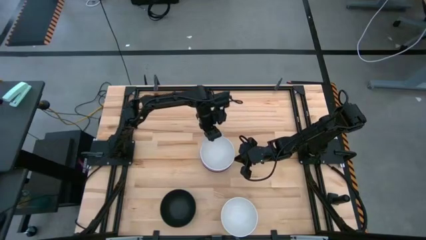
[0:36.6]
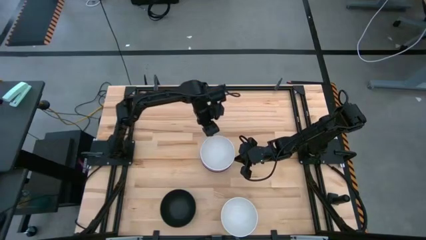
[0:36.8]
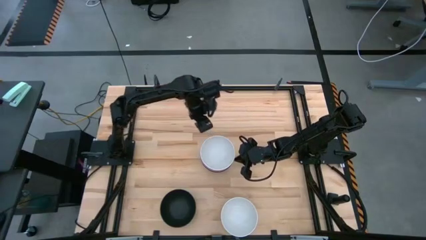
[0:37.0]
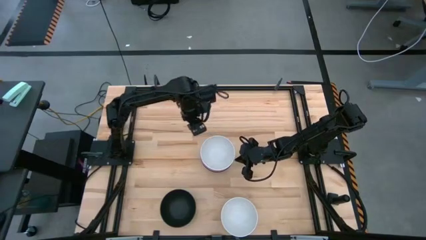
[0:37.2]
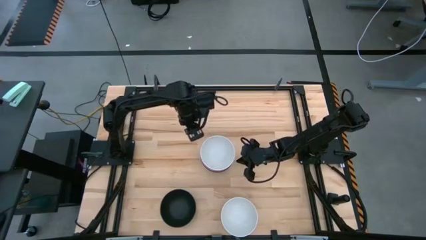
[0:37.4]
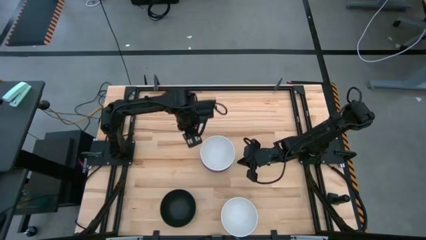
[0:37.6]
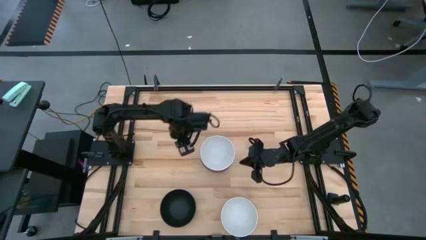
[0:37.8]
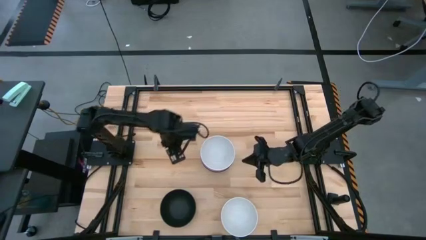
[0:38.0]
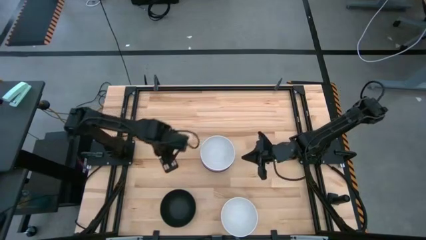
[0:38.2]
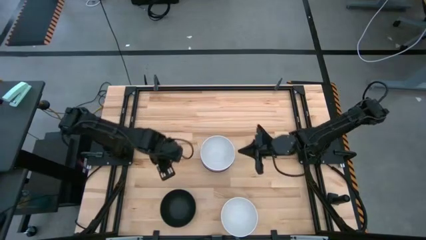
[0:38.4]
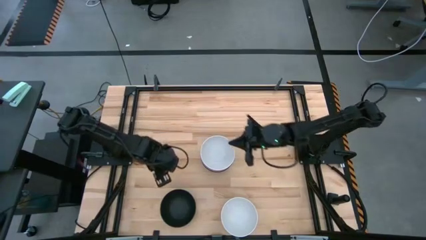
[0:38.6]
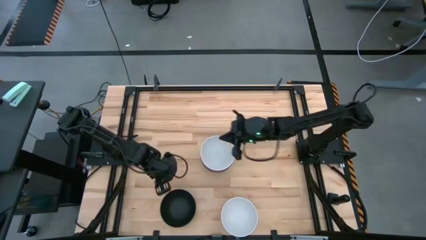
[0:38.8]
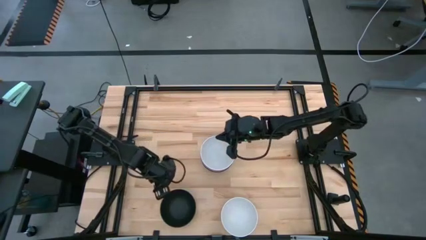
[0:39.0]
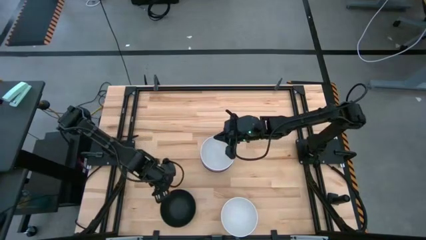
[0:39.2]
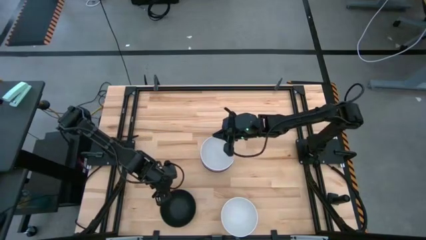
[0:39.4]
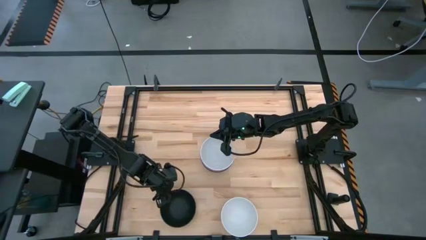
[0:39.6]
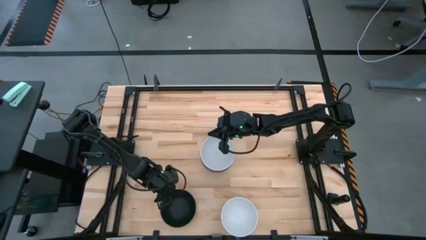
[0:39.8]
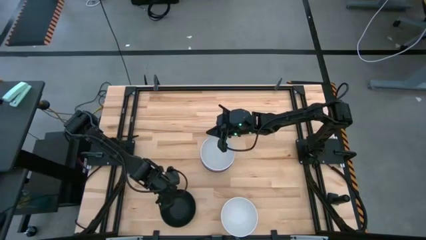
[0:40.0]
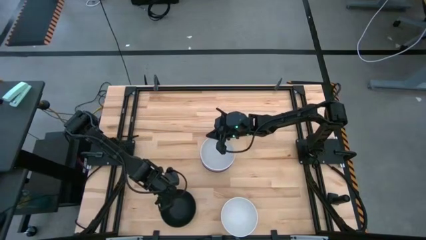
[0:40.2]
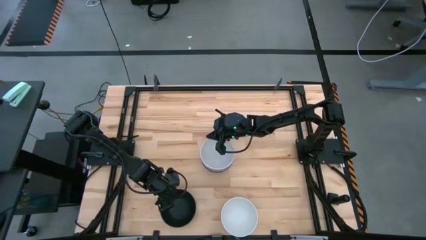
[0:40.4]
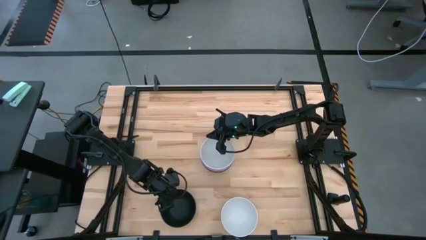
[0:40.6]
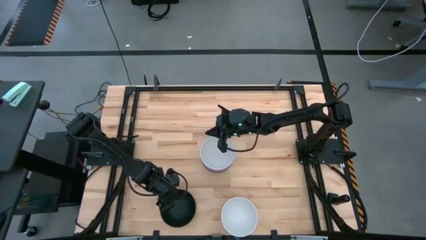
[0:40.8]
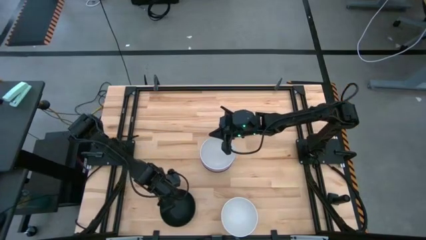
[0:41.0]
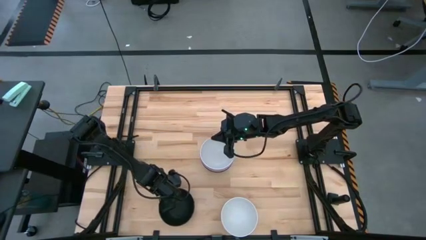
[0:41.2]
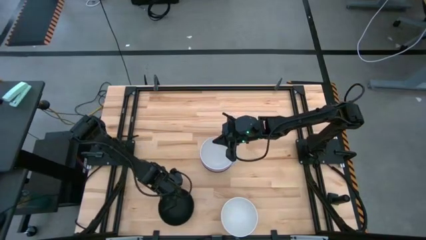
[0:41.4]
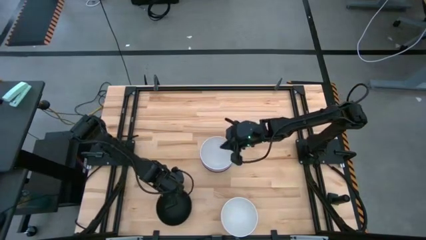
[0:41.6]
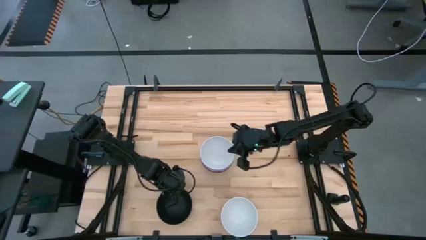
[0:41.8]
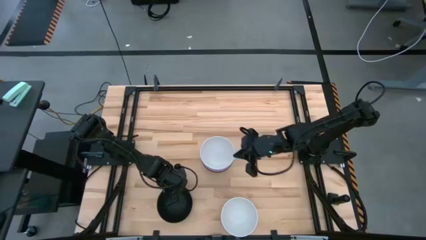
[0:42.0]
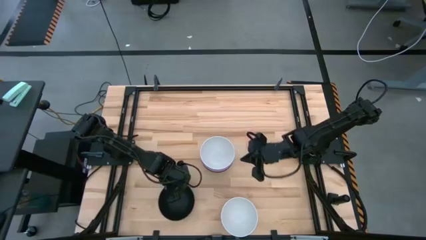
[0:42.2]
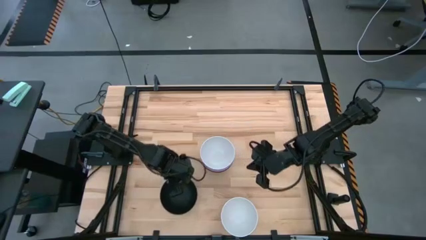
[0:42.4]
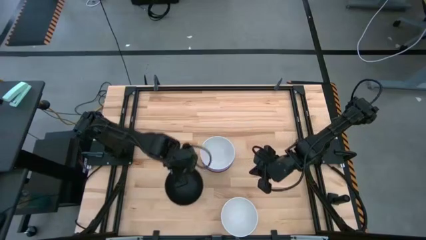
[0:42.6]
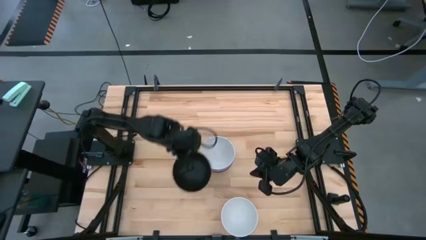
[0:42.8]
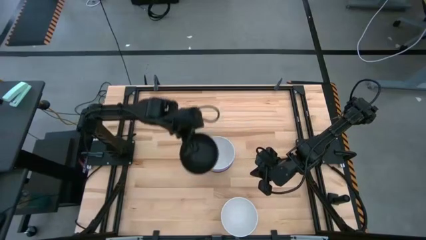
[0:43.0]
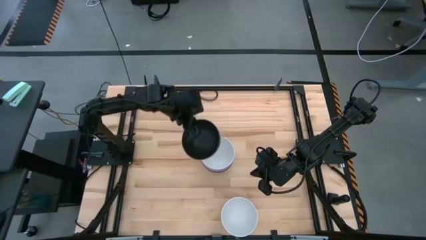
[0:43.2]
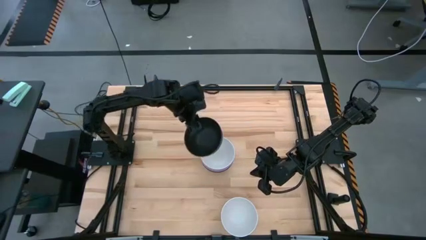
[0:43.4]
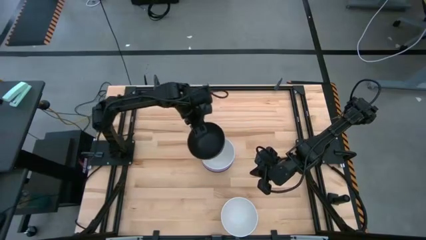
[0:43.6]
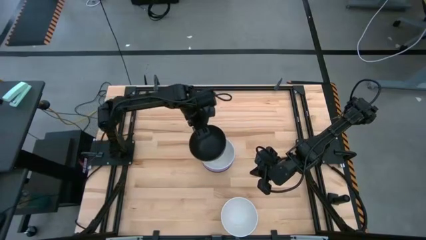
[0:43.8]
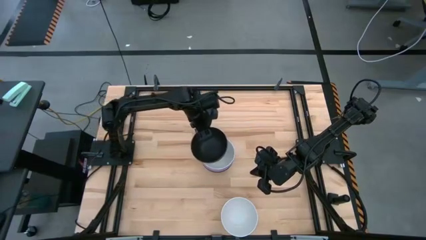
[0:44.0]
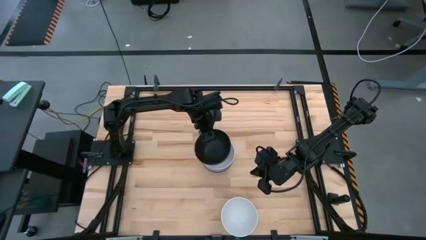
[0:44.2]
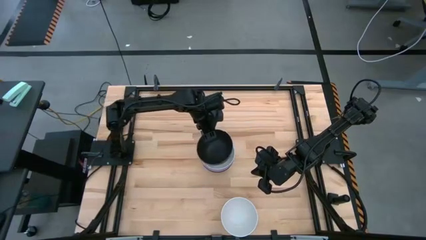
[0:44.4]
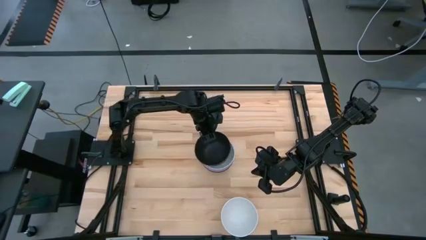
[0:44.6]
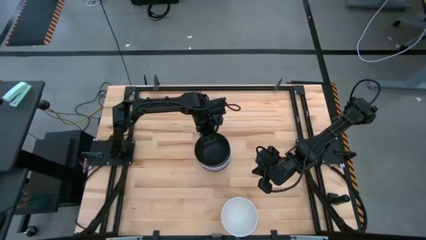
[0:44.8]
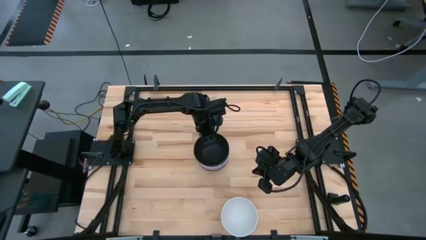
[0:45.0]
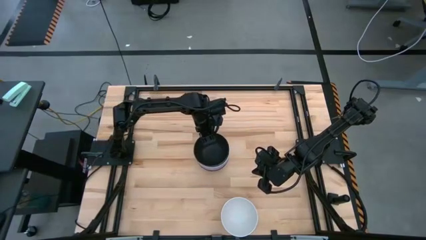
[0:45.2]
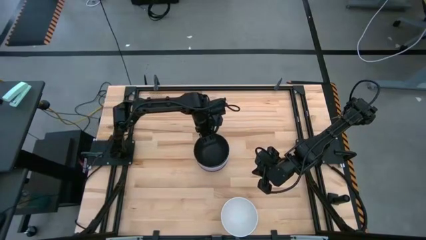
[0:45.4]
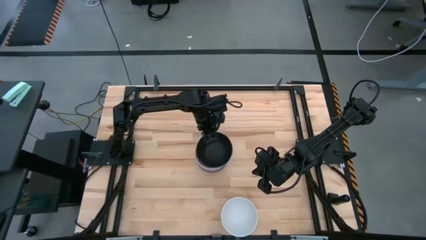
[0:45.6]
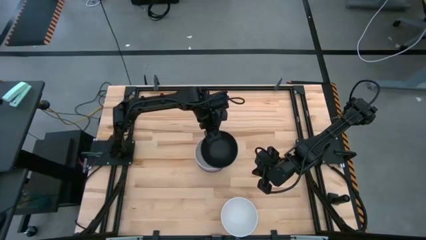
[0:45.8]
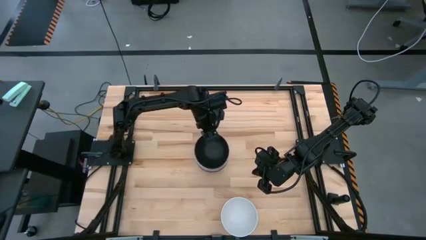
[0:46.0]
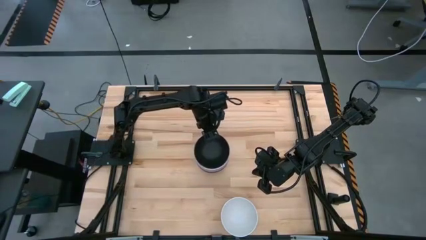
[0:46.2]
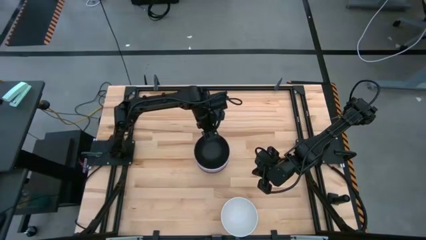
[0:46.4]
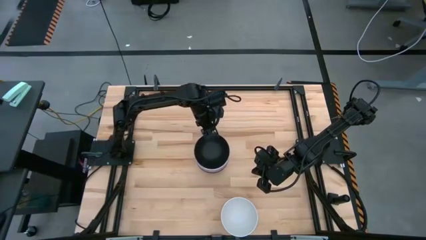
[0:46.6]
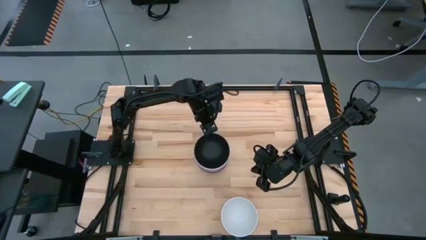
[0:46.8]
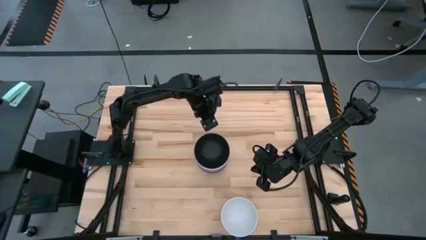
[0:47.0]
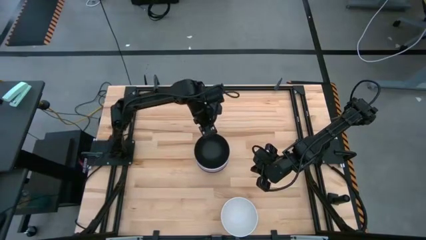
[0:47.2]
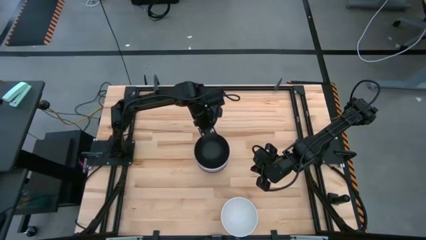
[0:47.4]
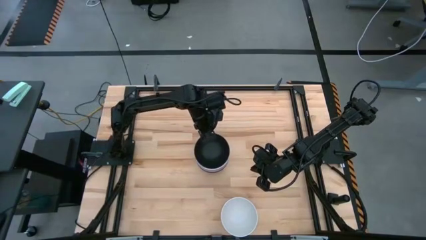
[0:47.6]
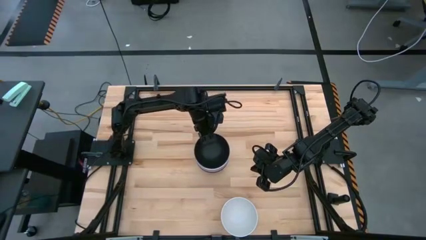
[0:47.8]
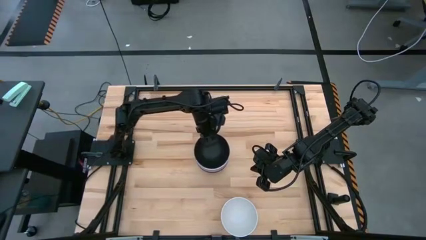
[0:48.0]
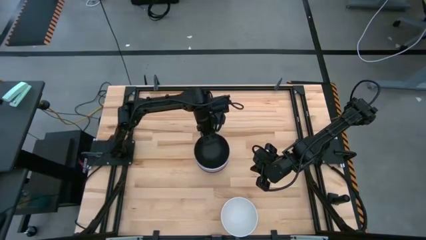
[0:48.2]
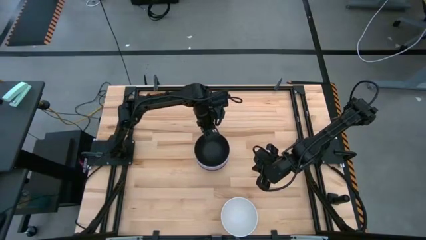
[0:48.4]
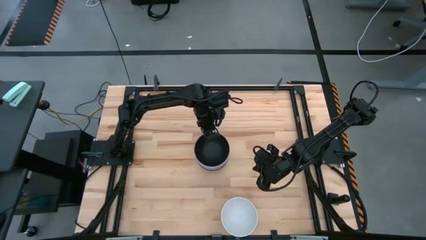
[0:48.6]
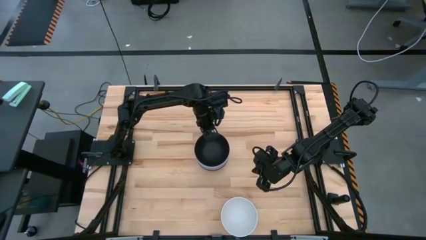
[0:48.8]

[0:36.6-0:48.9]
Task: Nest bowls inside each other
Stack the black bowl on top of the white bowl
